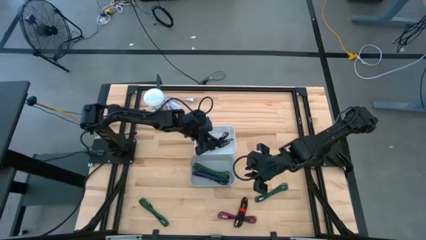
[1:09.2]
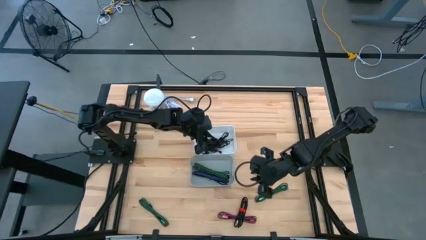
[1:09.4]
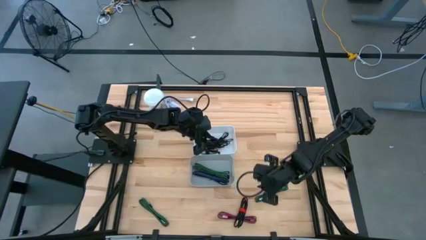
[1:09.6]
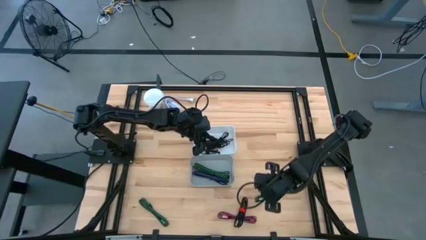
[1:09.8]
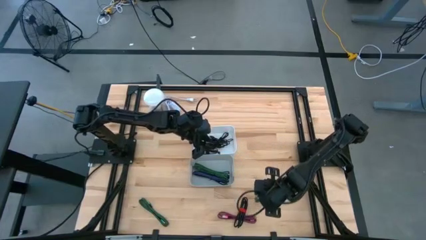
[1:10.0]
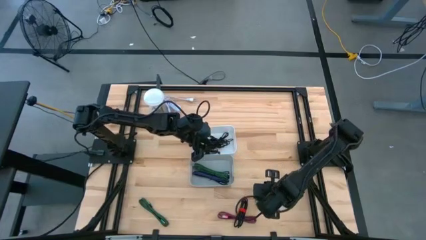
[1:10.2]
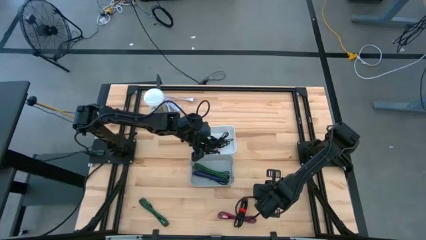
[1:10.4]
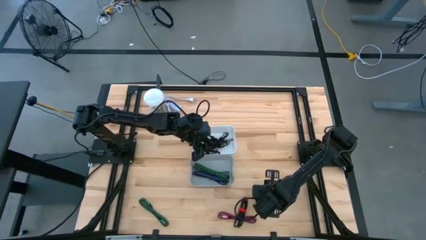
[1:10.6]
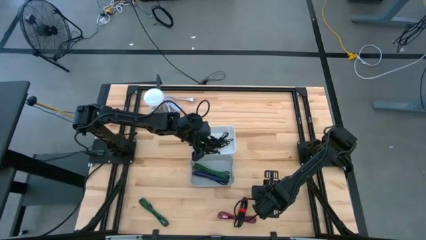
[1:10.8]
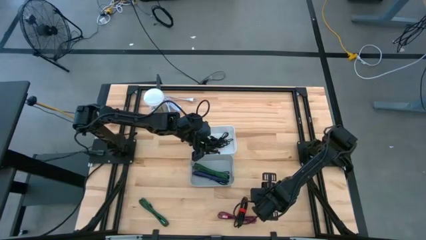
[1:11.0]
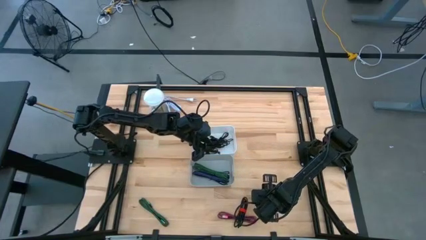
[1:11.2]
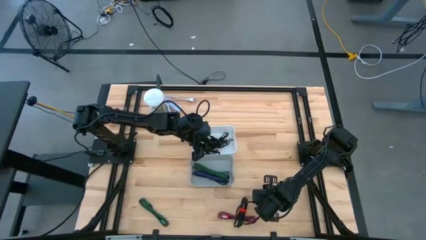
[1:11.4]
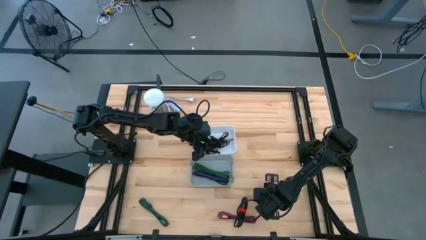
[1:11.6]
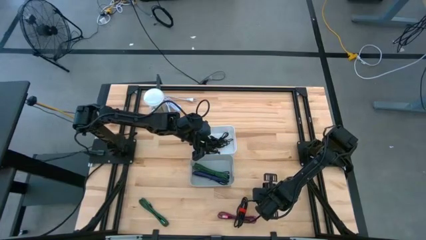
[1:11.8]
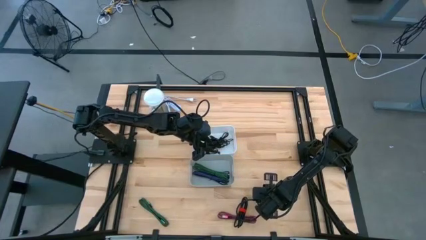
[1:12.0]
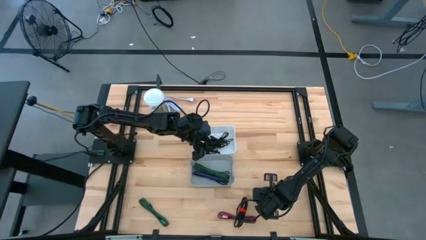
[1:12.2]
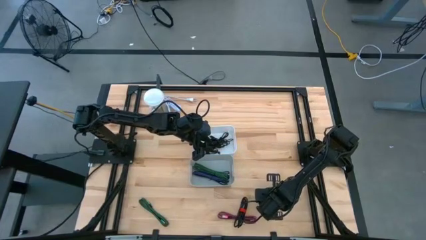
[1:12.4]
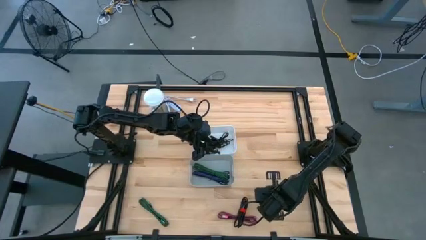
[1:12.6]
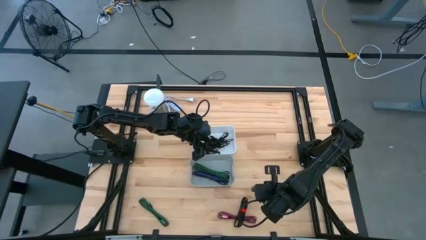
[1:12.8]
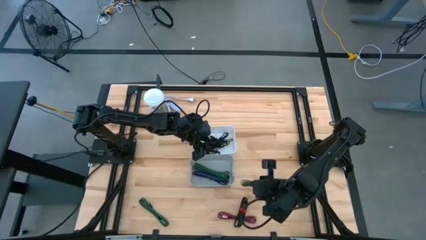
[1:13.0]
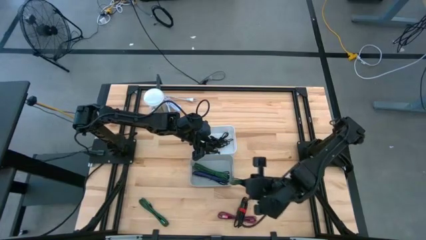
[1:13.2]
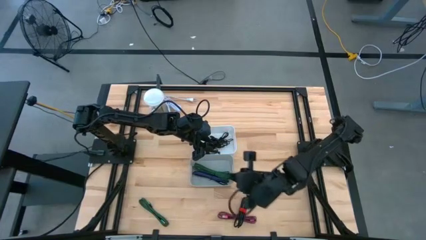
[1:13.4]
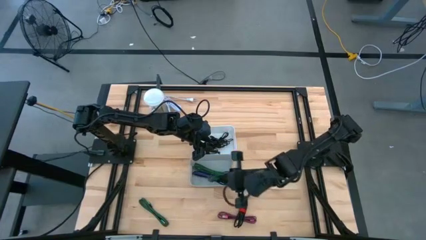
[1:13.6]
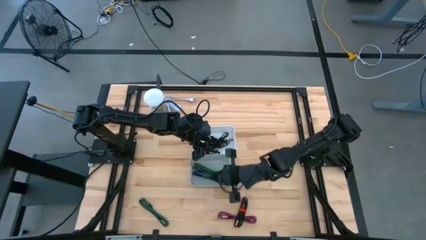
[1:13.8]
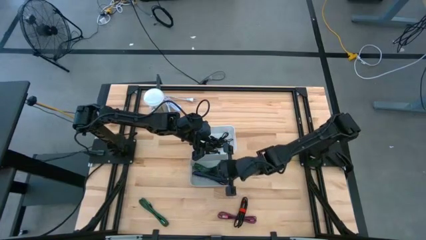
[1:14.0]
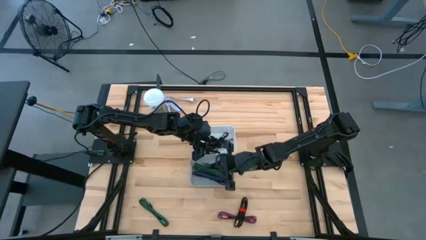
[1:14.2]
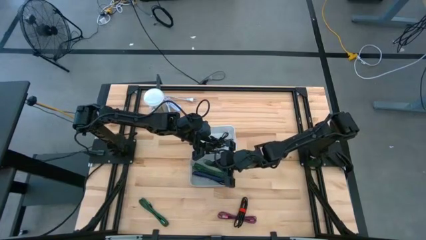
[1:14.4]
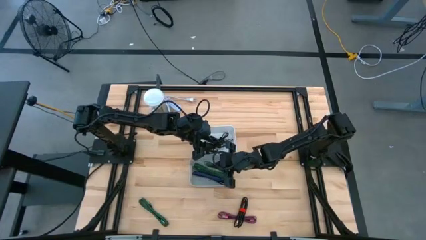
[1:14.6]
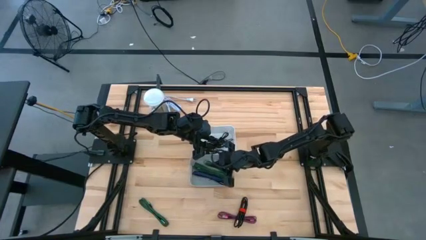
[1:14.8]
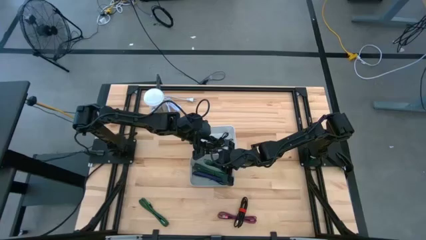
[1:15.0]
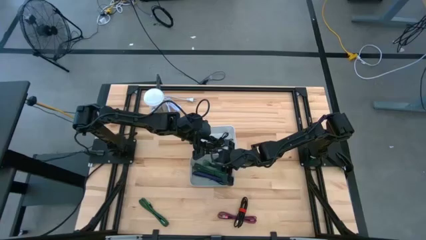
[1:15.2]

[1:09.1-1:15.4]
Task: Pick & Place USB Port
Put the green charger cable into the gray container

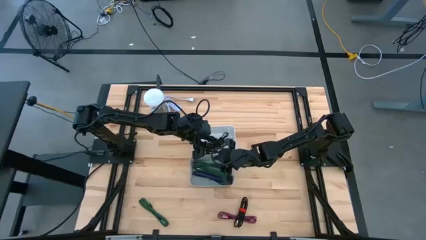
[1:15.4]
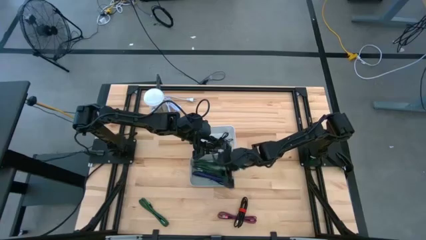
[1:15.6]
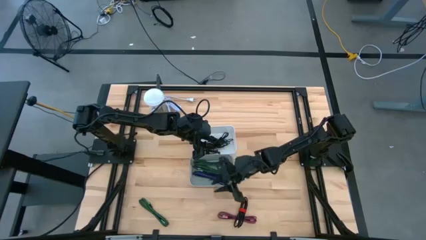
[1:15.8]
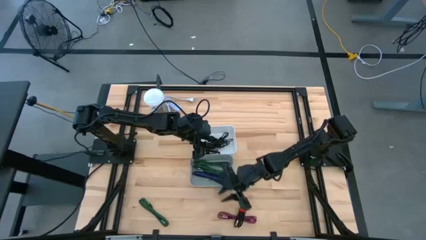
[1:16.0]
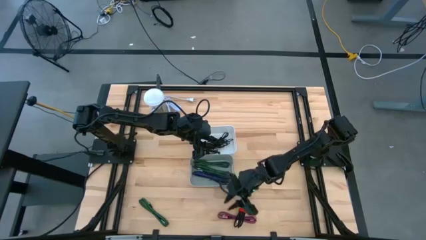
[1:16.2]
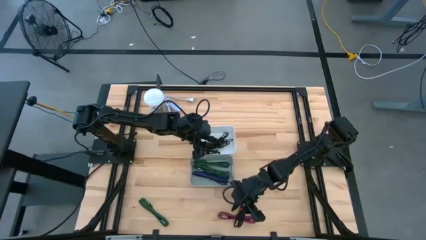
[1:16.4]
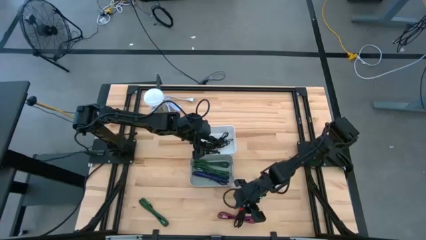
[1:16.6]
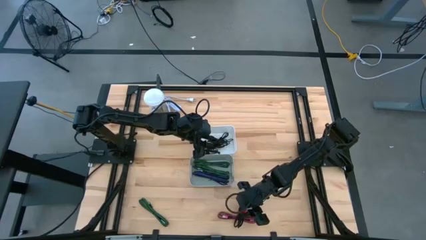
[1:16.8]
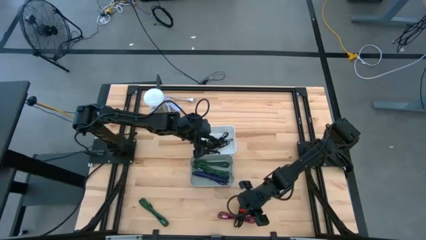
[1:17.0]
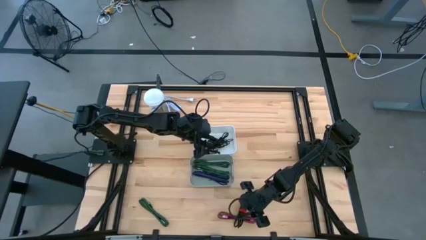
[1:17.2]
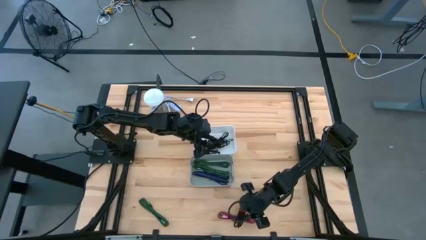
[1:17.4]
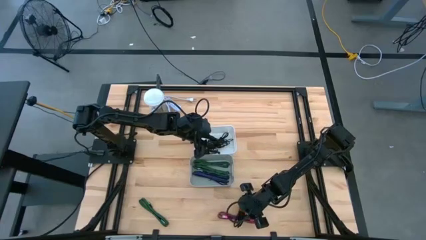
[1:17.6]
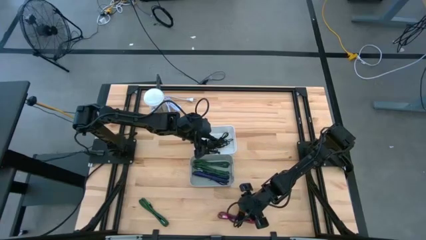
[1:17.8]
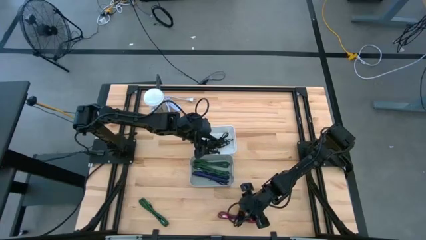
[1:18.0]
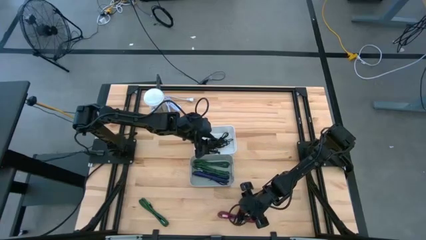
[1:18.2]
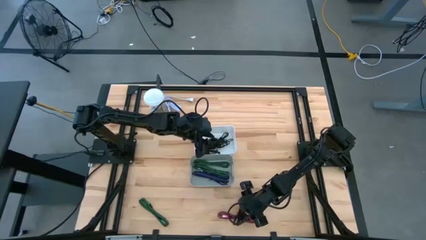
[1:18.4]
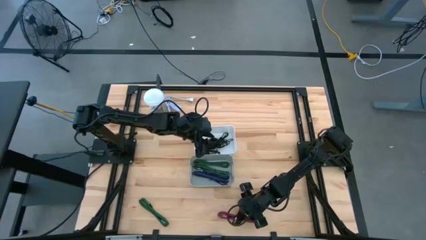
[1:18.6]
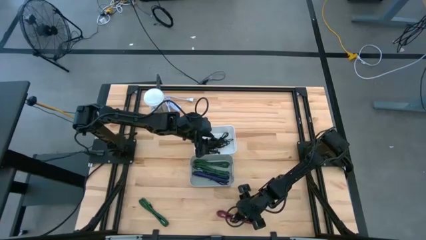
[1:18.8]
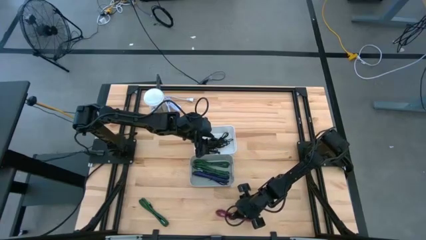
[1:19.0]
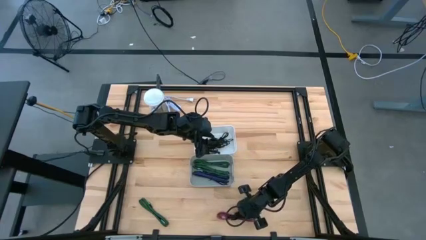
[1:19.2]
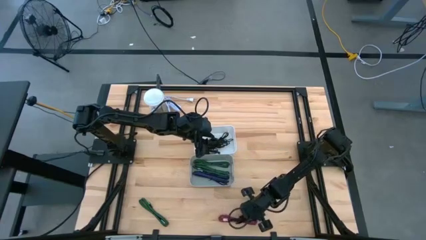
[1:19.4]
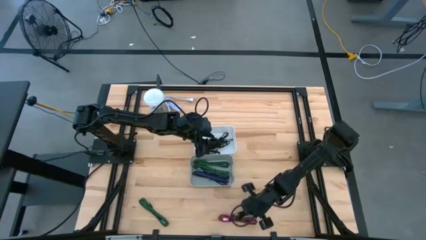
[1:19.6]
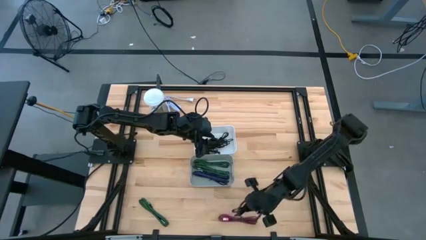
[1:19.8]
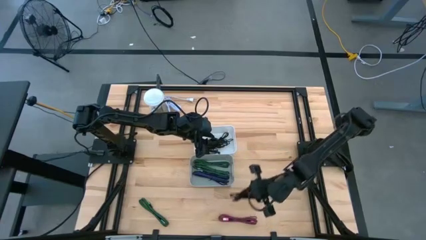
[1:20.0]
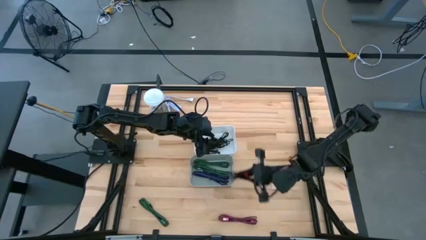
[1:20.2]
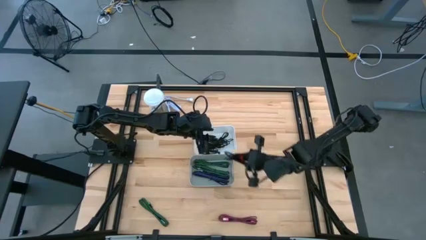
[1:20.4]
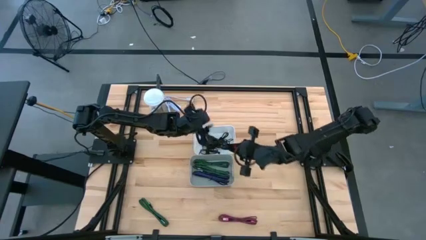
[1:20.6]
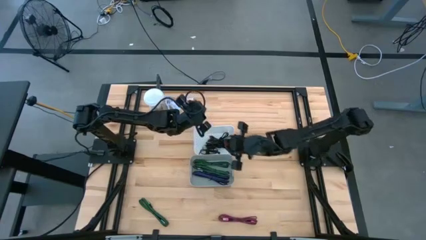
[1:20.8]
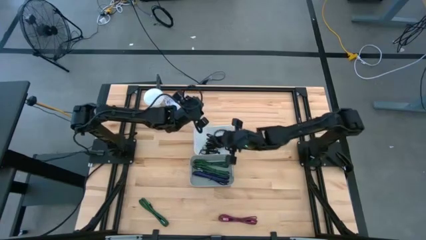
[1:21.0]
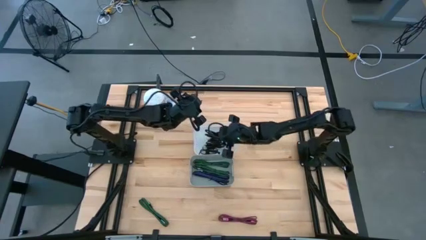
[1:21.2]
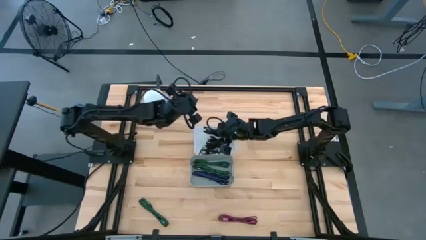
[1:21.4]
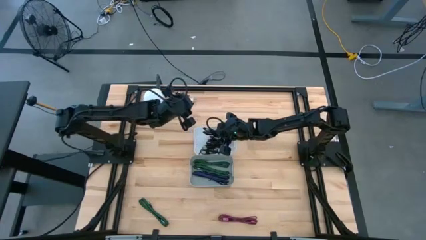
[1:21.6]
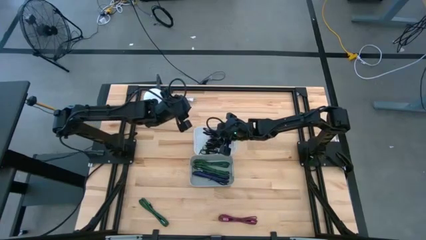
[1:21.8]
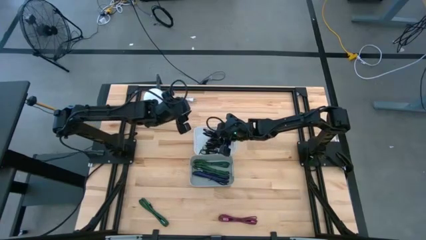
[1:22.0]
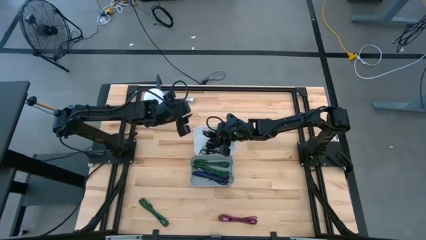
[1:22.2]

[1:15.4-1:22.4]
Put the black charger cable into the white container

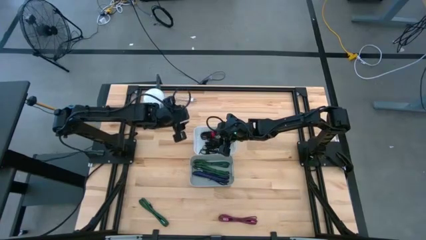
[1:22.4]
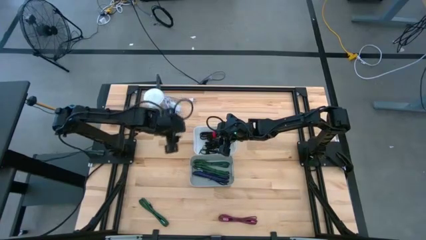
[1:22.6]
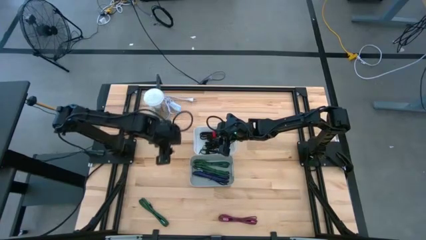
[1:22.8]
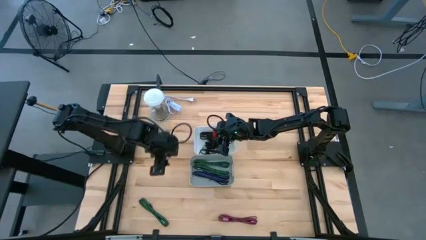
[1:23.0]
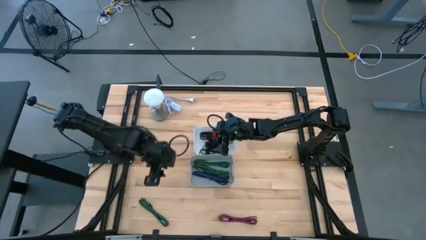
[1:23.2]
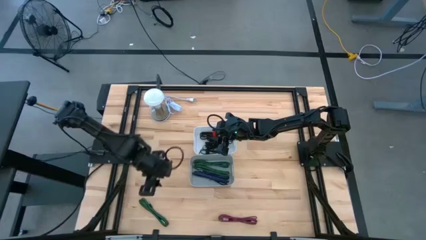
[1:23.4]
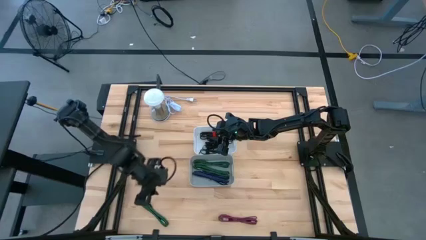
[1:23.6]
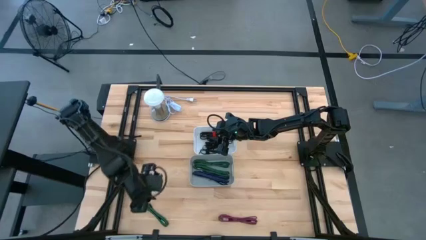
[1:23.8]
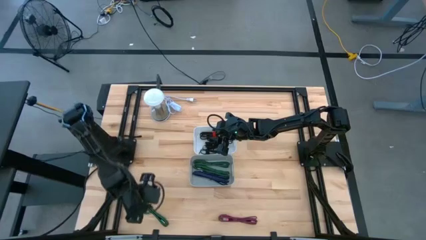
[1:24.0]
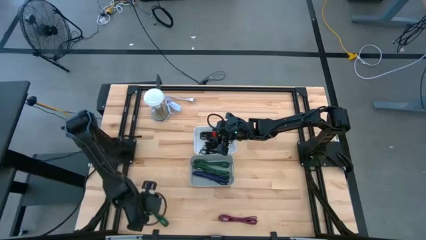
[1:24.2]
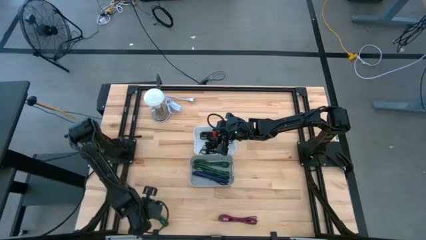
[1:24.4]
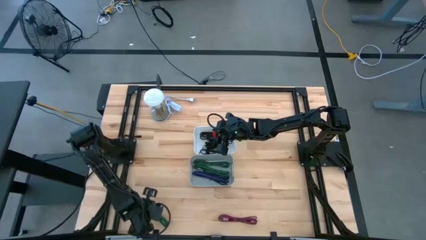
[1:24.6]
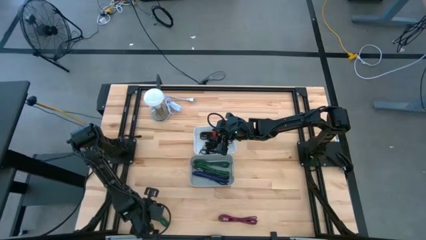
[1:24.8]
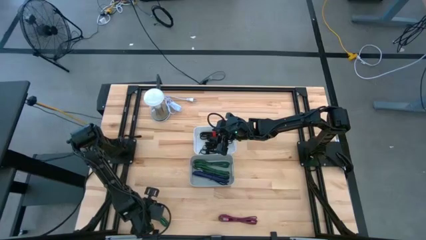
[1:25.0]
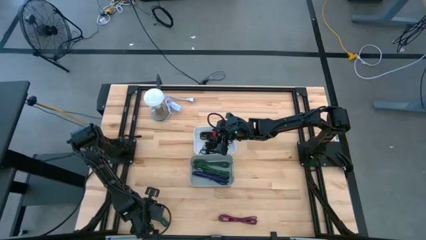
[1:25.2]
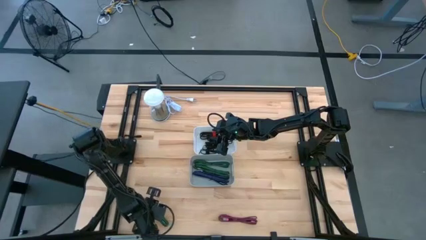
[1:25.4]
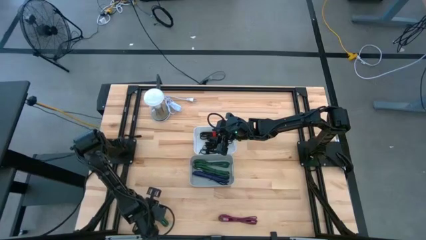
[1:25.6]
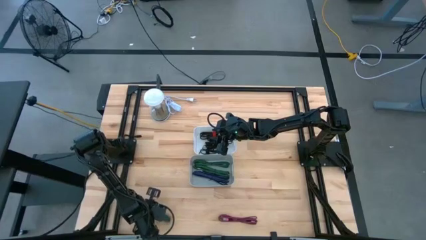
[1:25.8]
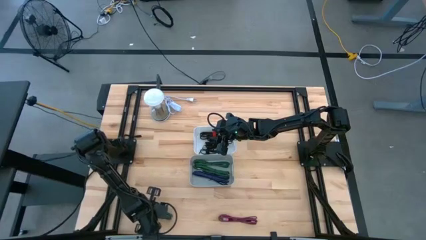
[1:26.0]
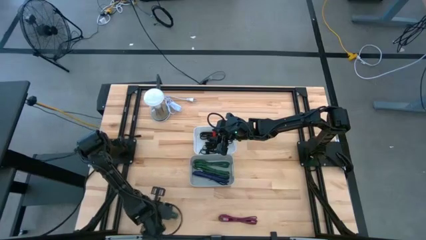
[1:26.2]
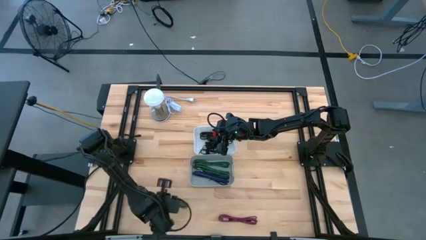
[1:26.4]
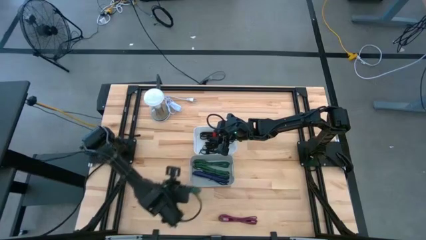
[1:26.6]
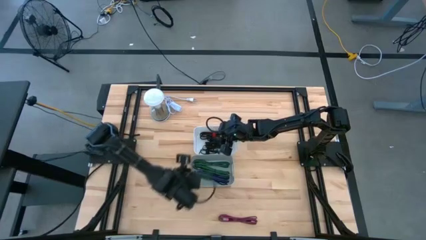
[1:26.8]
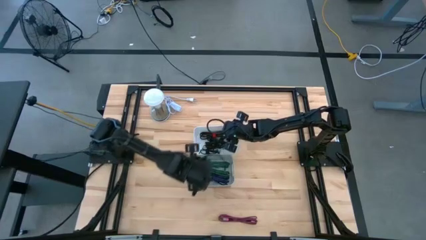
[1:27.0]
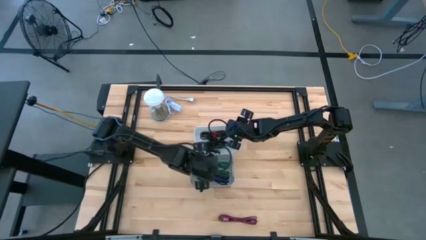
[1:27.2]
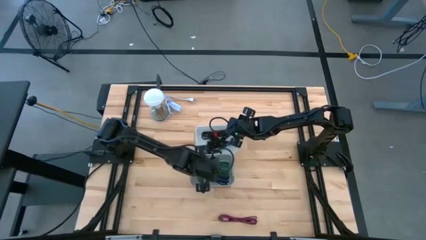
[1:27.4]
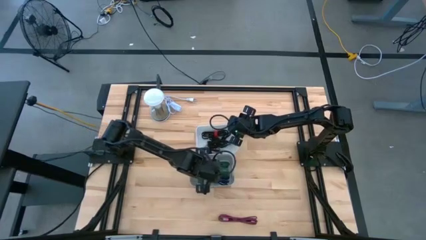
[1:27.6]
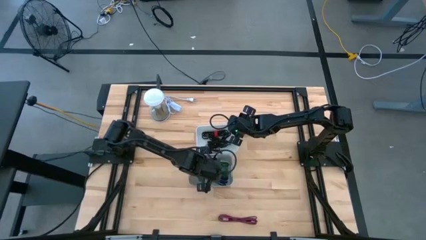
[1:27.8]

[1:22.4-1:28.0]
Put the green charger cable into the gray container
